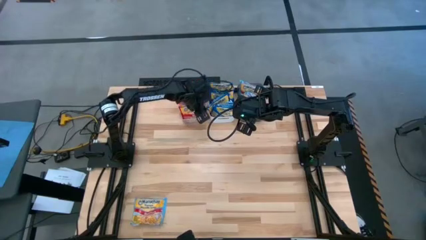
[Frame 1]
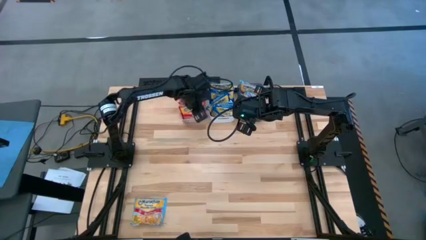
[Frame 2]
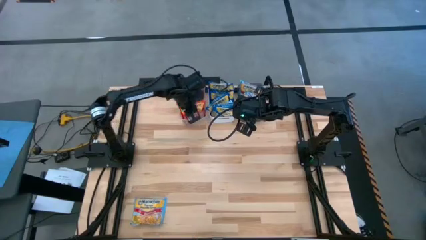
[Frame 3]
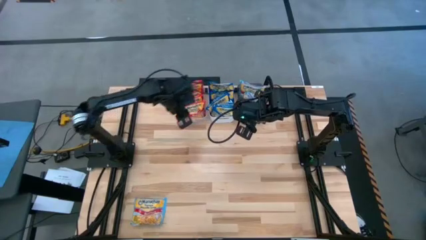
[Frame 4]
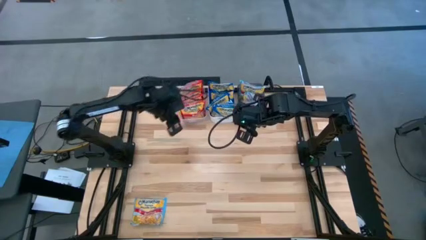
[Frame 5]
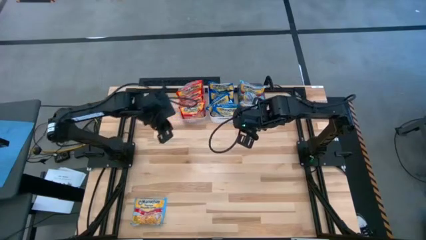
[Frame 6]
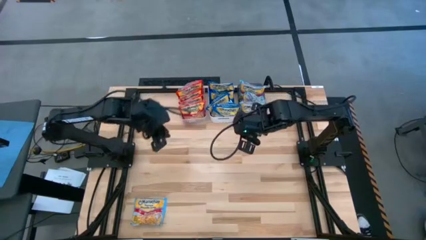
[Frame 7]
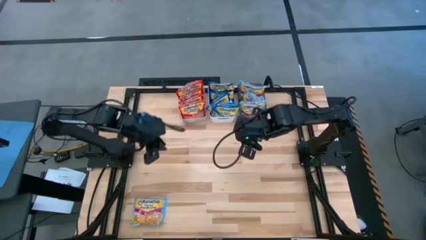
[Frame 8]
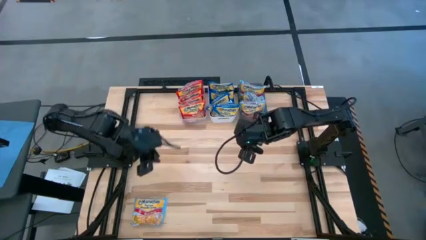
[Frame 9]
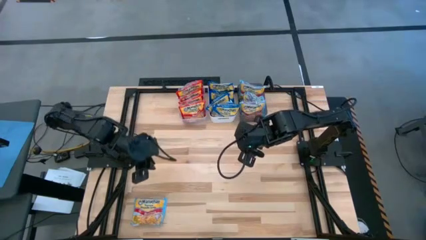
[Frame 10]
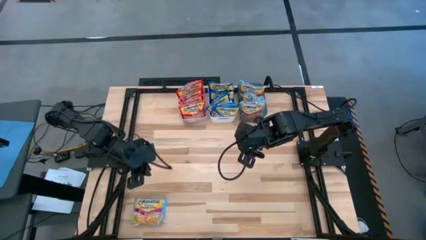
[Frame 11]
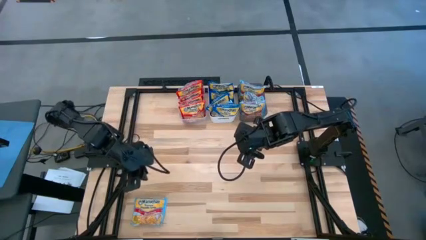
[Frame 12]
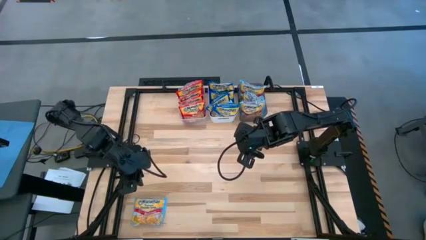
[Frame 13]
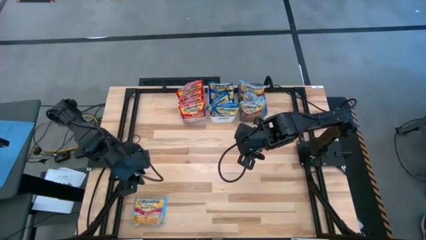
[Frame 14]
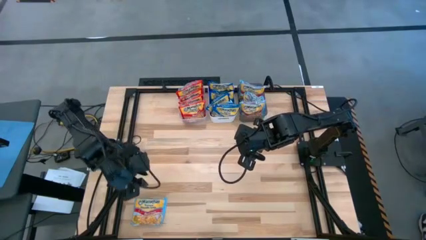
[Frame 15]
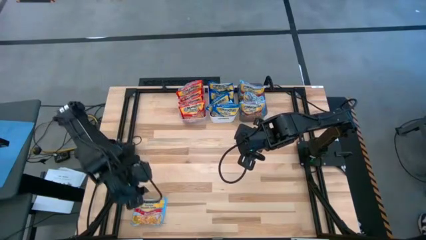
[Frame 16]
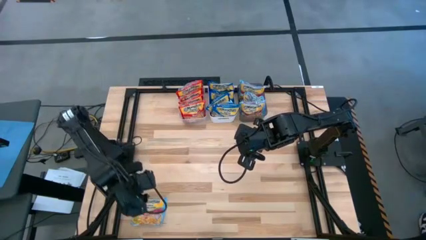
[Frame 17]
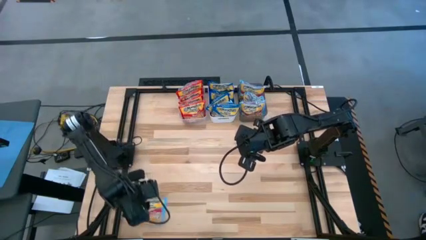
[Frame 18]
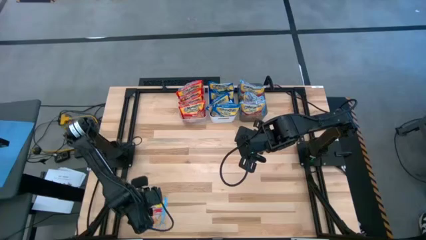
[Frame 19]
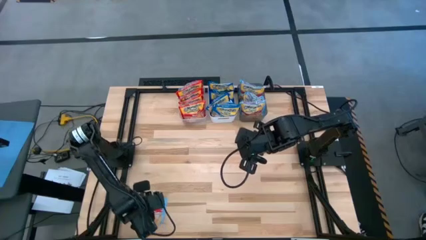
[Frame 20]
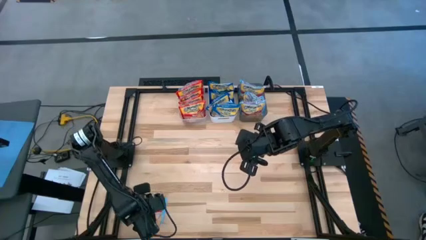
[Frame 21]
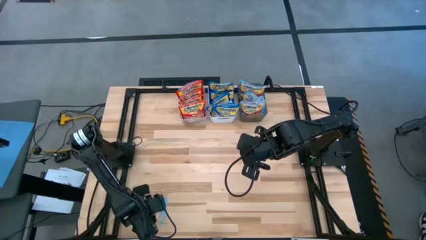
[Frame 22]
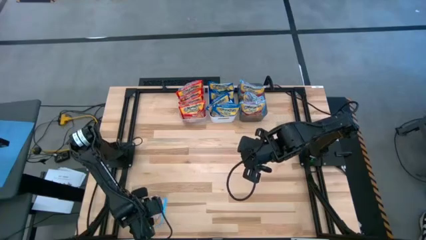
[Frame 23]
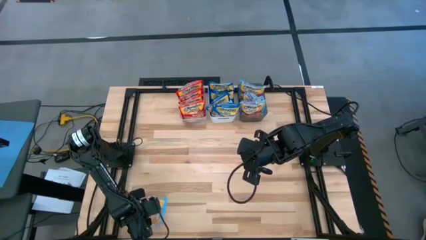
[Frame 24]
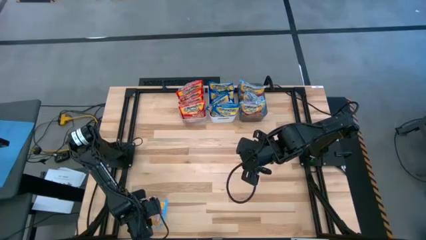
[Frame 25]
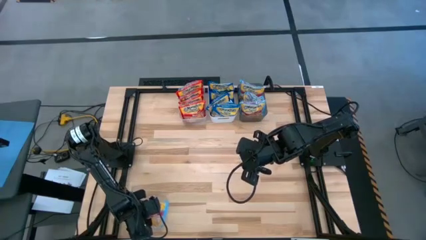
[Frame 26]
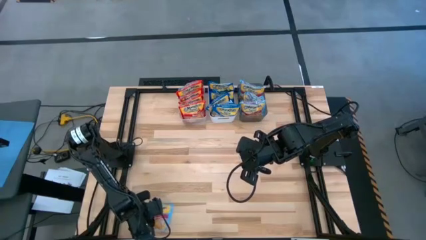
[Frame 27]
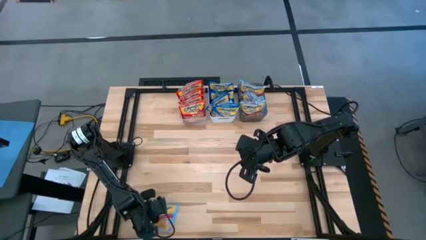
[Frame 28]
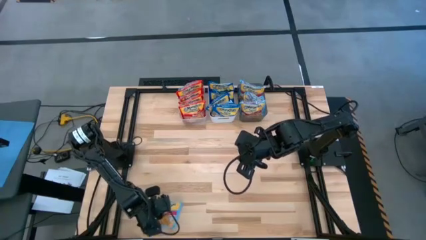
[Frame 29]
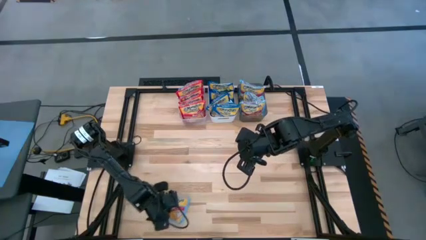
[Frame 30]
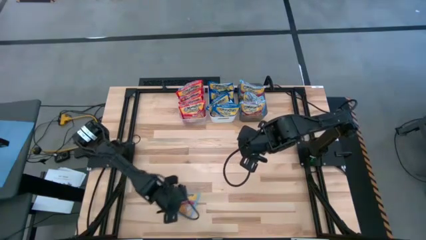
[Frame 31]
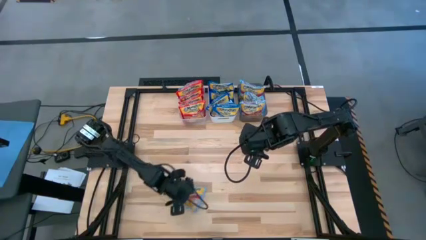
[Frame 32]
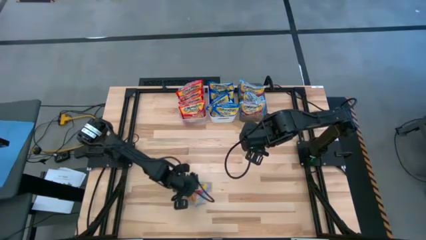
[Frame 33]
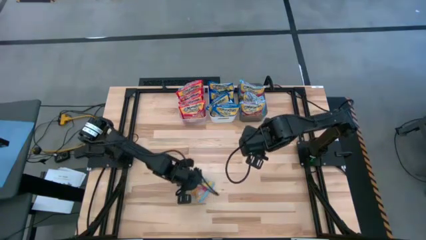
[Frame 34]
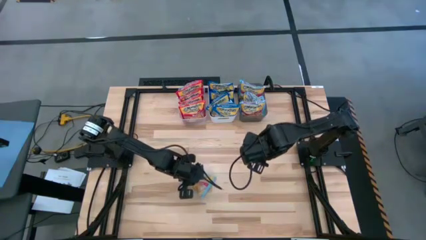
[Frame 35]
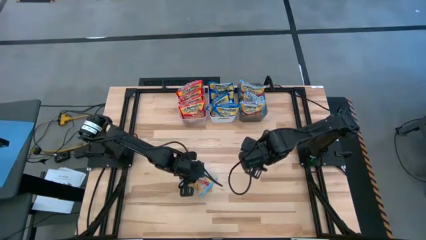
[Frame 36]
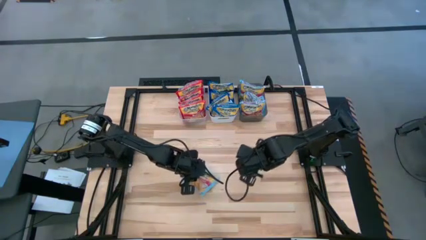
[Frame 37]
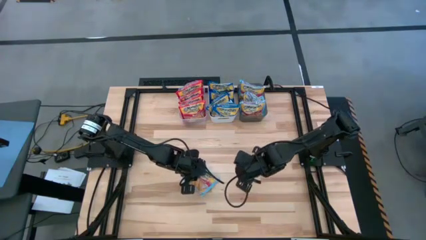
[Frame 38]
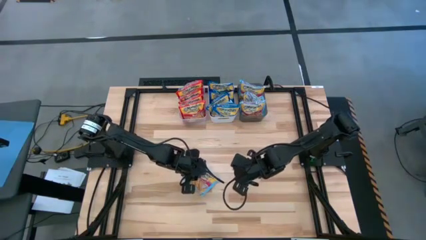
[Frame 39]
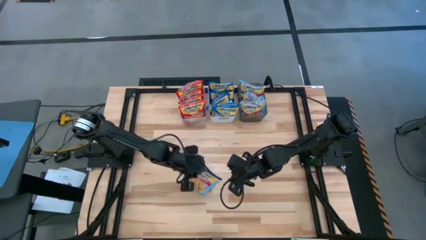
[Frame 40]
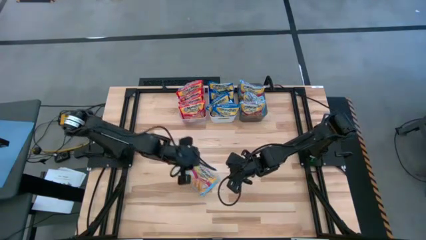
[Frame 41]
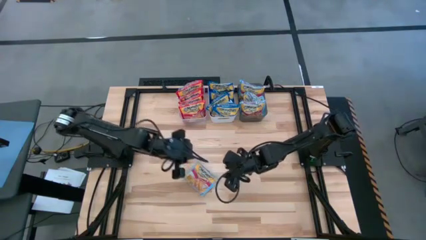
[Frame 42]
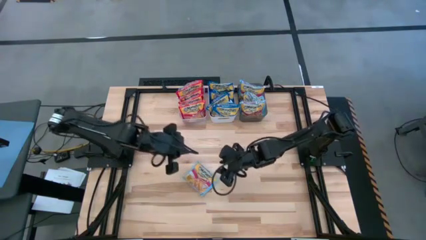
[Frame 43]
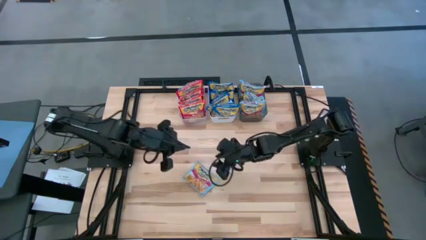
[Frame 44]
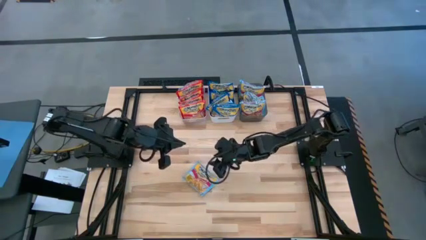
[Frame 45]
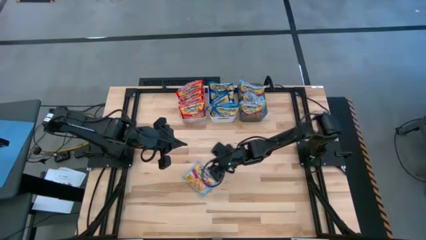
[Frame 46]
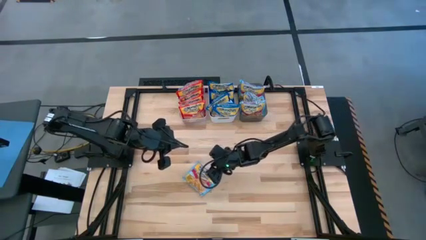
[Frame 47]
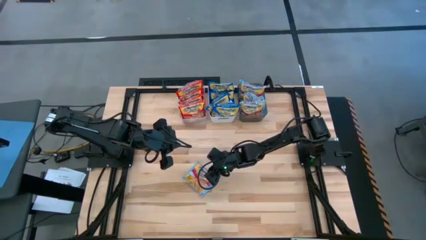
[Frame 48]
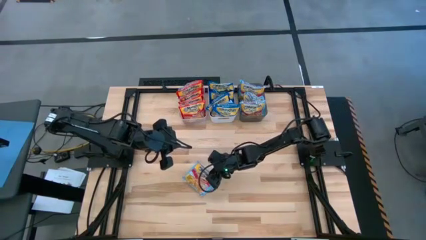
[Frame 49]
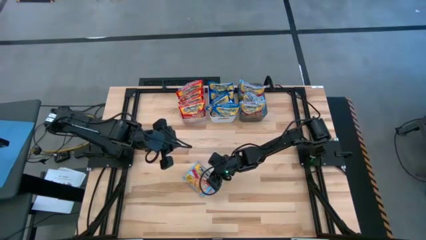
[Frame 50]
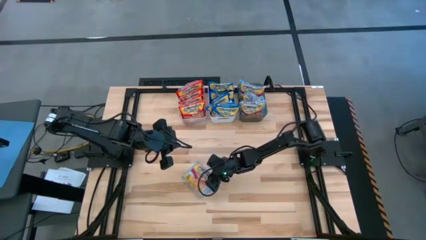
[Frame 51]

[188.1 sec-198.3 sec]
Task: Sort Maruchan noodles
Put the light blue noodle pack into the black bin

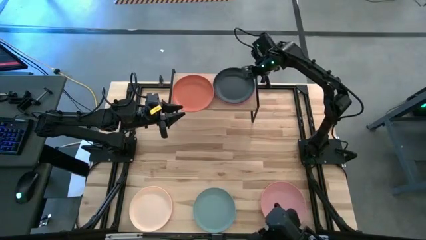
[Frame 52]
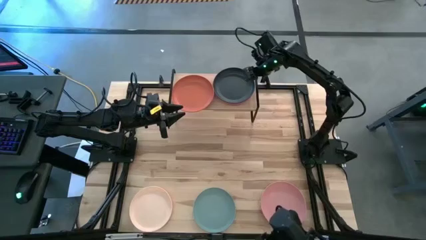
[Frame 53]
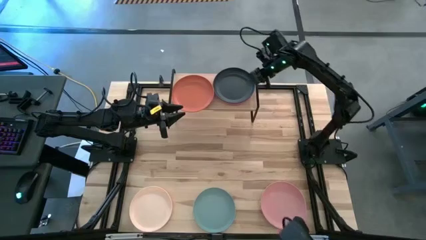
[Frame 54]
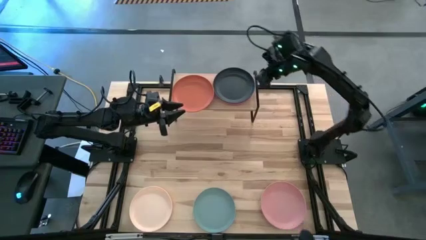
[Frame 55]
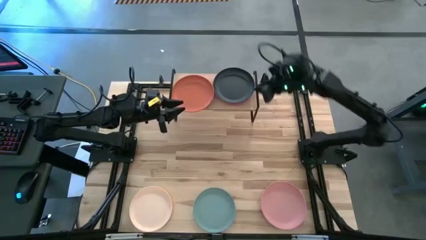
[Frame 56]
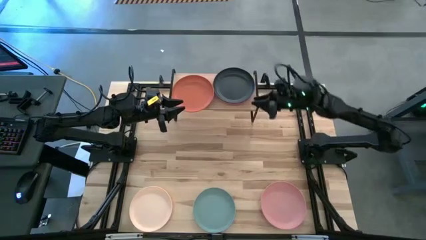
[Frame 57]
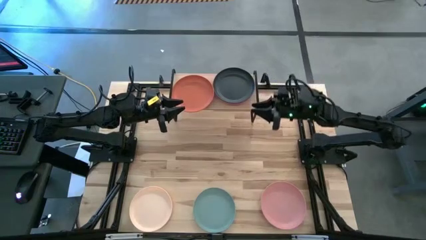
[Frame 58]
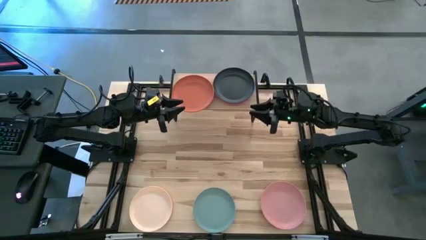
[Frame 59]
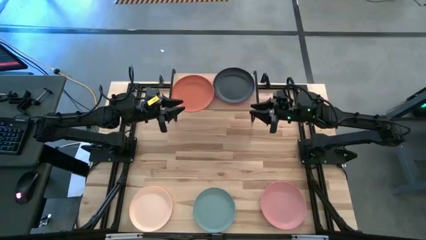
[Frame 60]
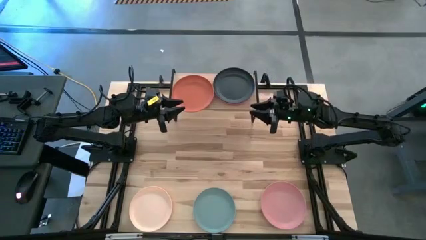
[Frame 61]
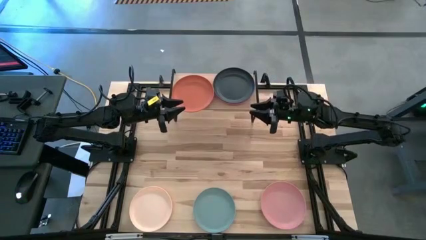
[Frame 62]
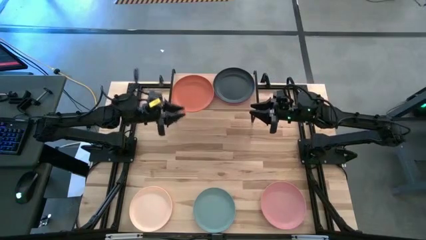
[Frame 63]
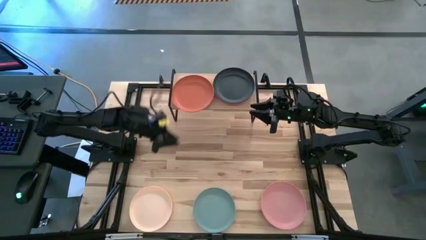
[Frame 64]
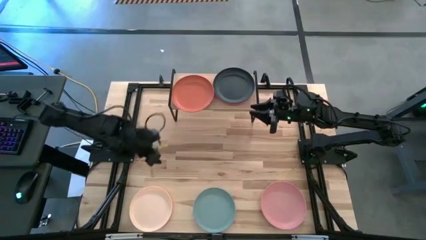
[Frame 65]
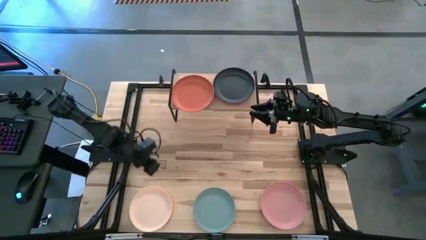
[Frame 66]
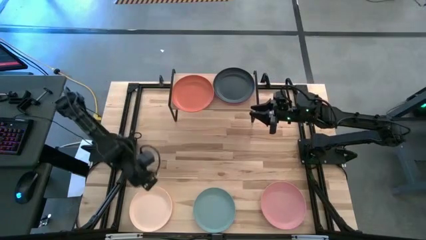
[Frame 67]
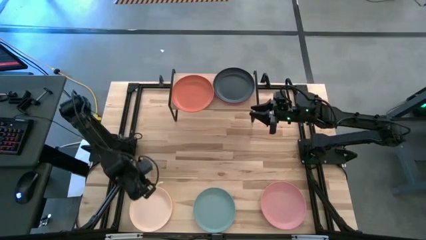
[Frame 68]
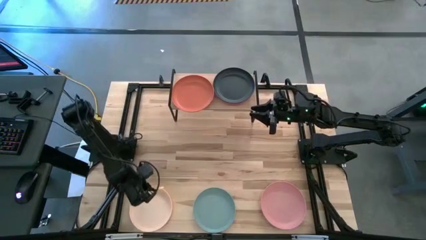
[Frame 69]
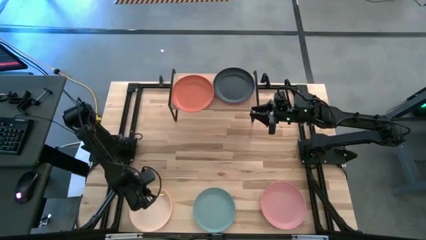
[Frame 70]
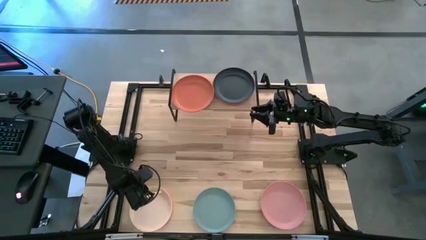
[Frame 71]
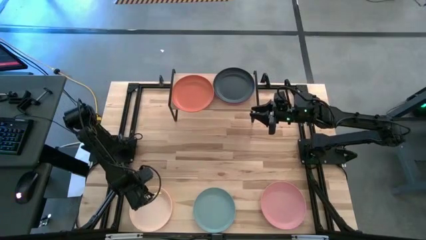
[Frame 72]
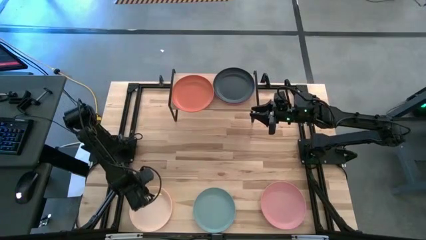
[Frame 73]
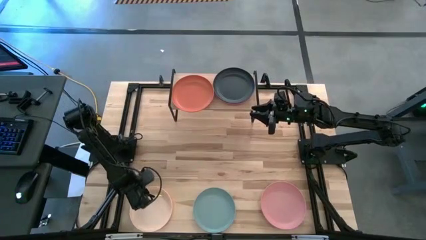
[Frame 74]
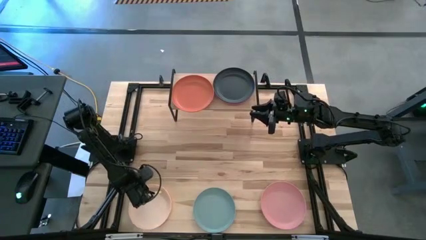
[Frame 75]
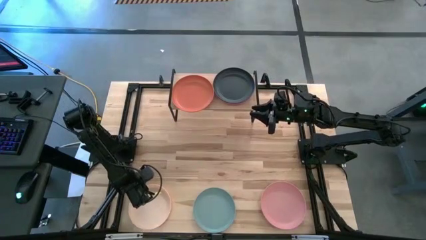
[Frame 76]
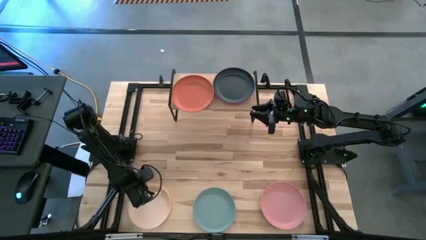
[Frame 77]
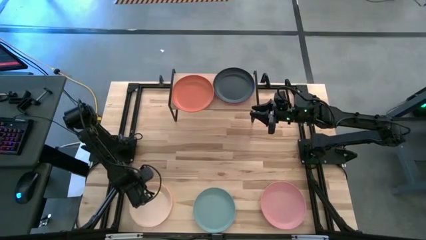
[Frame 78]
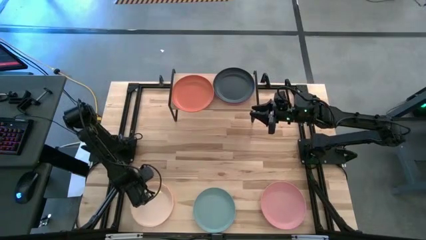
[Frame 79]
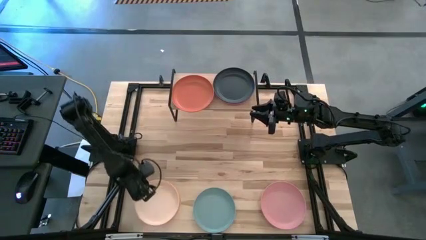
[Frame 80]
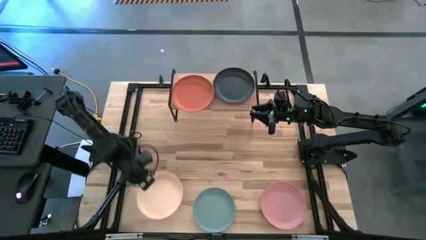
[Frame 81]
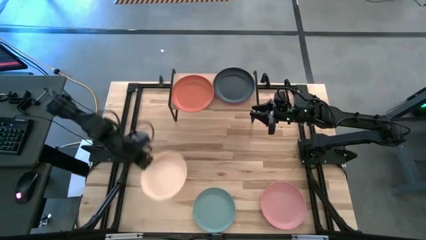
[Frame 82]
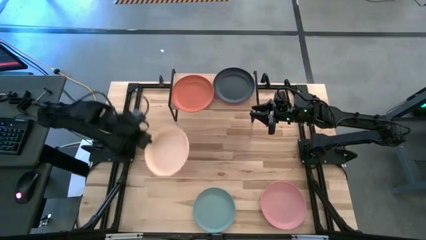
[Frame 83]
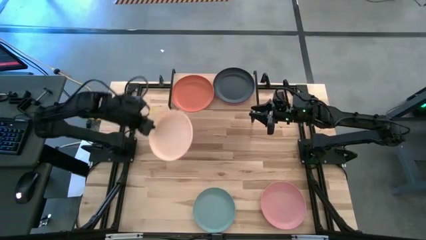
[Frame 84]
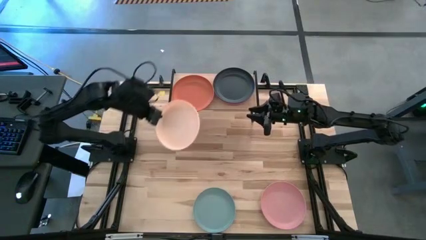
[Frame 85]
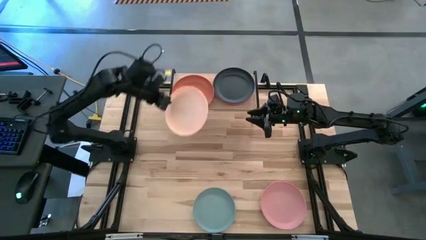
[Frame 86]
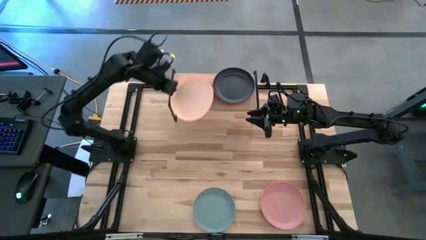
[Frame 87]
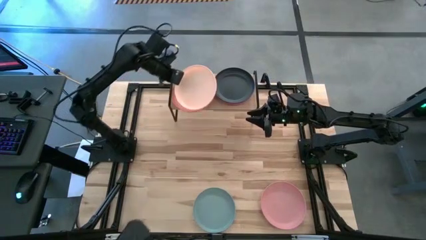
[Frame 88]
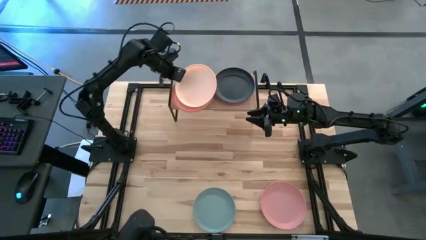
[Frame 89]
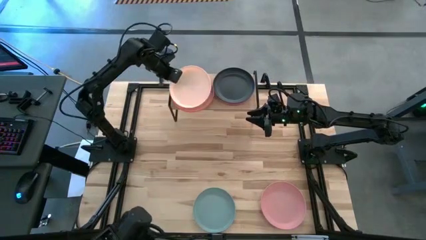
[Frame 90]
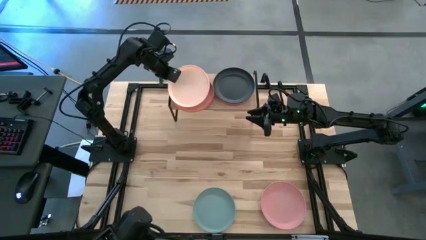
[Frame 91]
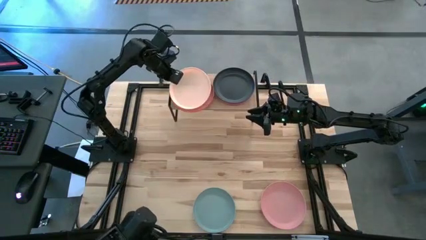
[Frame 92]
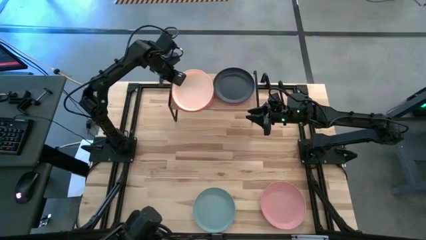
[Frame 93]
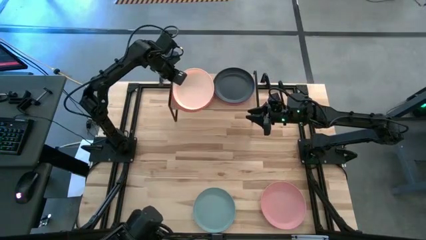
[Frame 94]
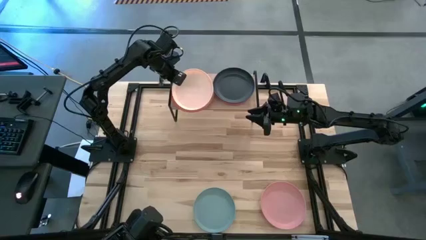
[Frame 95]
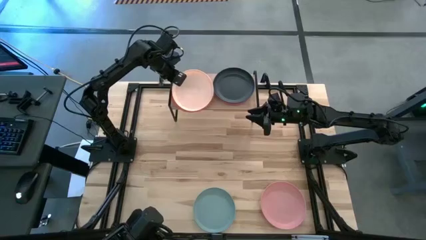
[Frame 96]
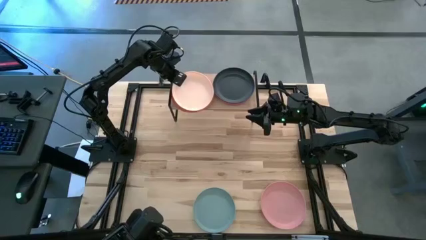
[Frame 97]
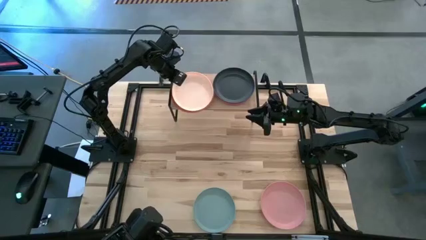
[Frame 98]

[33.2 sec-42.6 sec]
Task: Place and stack plates onto a shelf
Stack the light orange plate on top of the orange plate on the shelf
